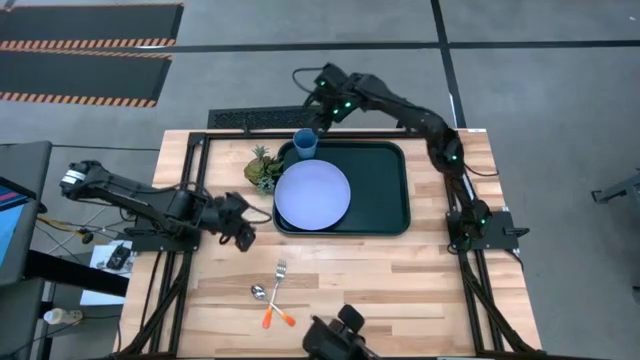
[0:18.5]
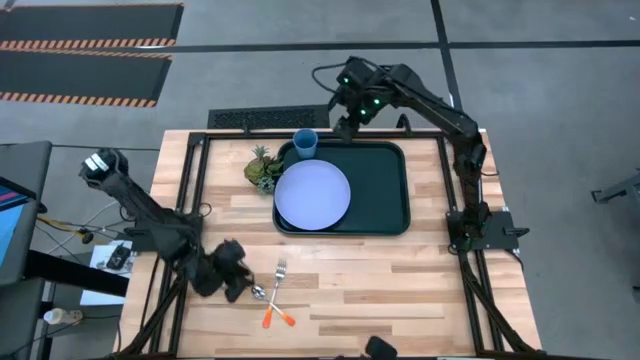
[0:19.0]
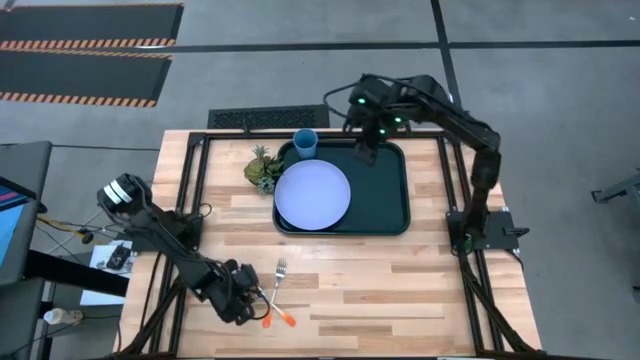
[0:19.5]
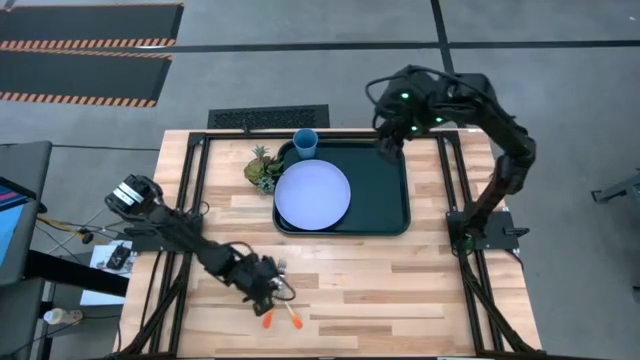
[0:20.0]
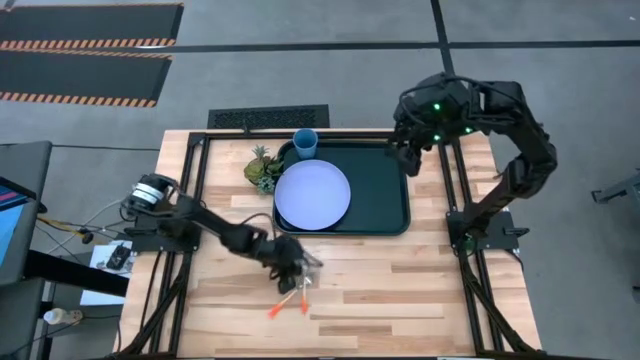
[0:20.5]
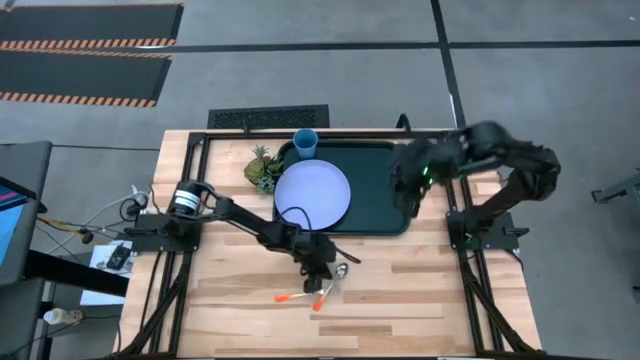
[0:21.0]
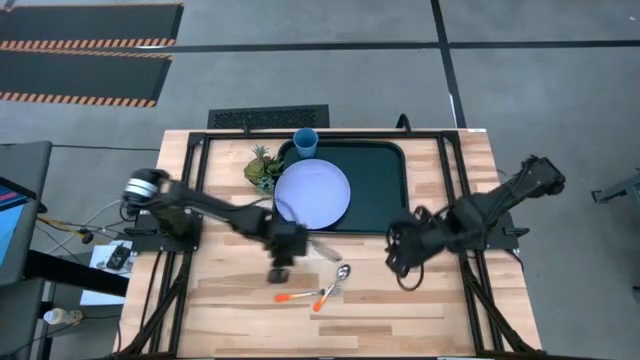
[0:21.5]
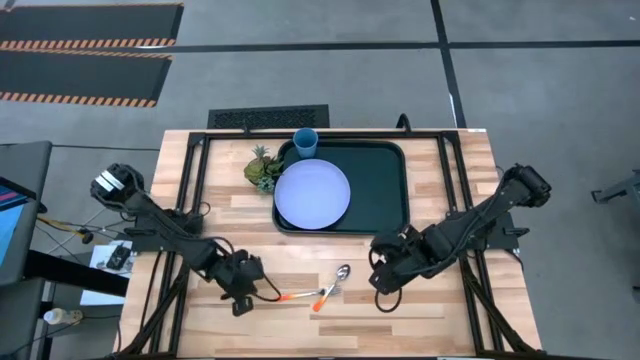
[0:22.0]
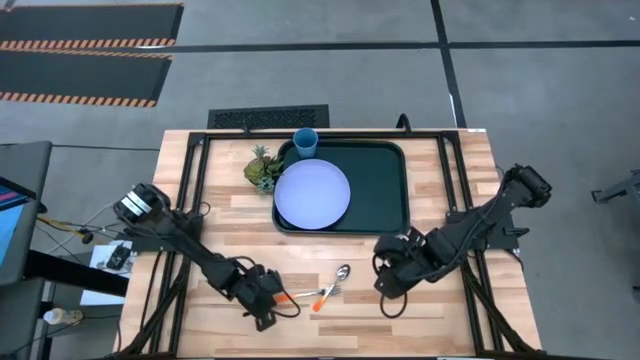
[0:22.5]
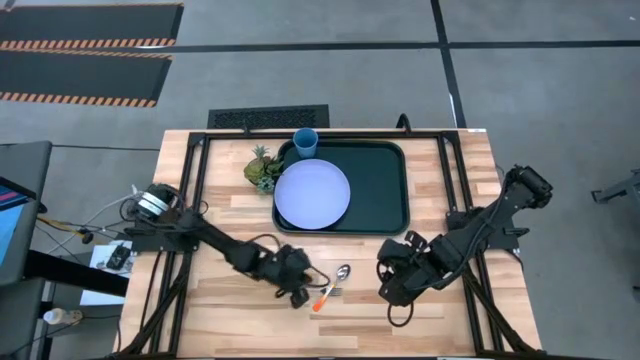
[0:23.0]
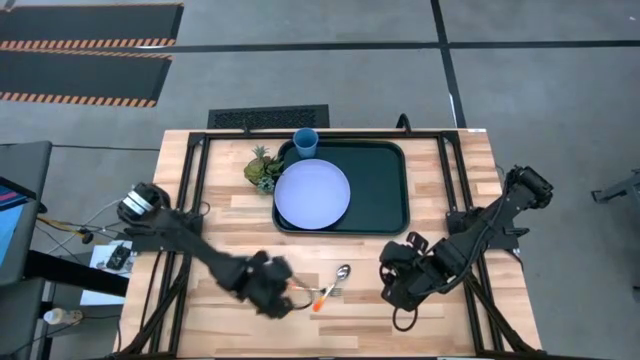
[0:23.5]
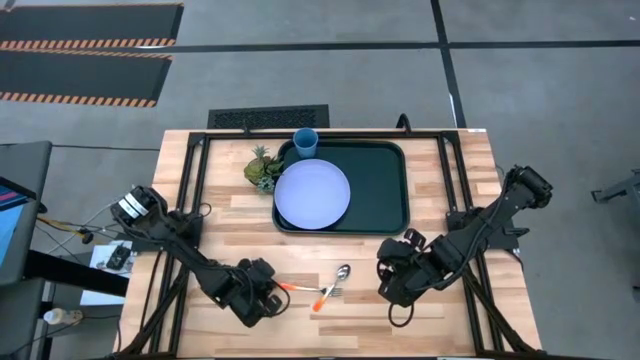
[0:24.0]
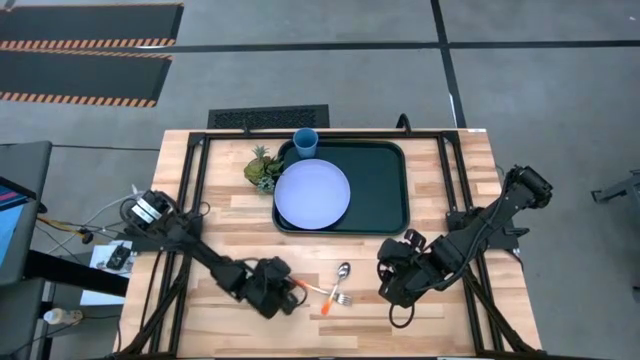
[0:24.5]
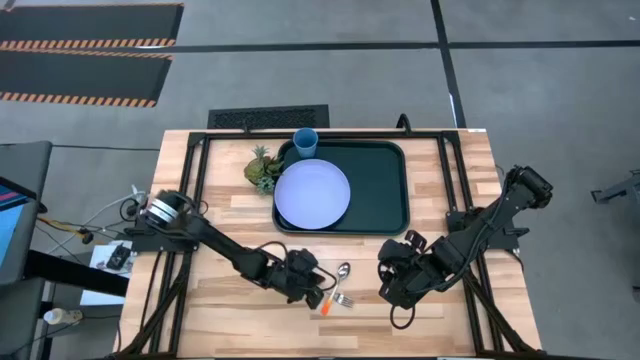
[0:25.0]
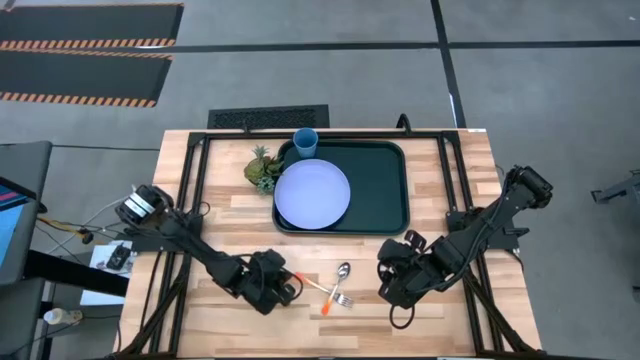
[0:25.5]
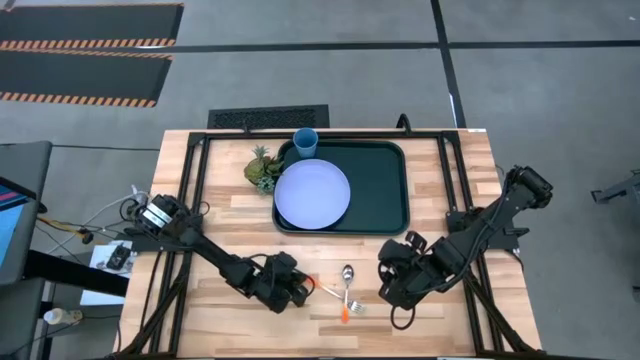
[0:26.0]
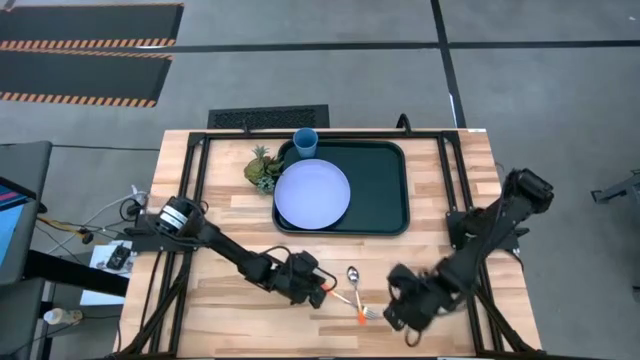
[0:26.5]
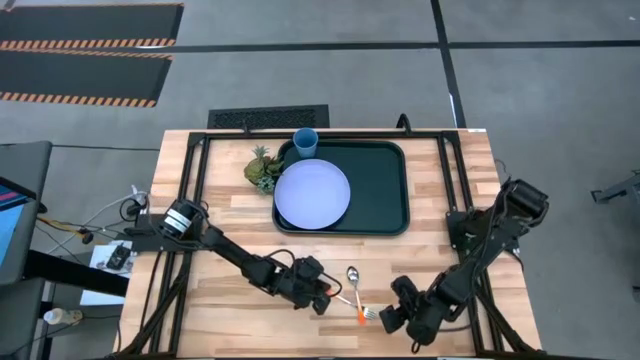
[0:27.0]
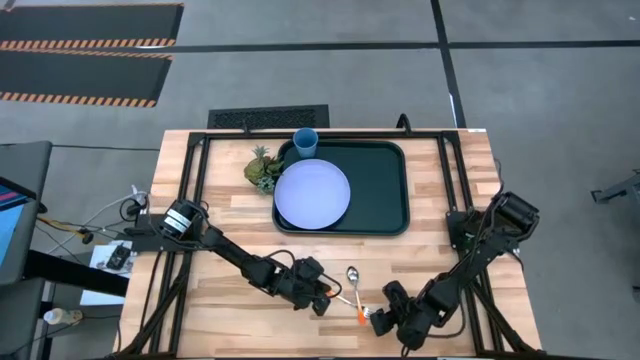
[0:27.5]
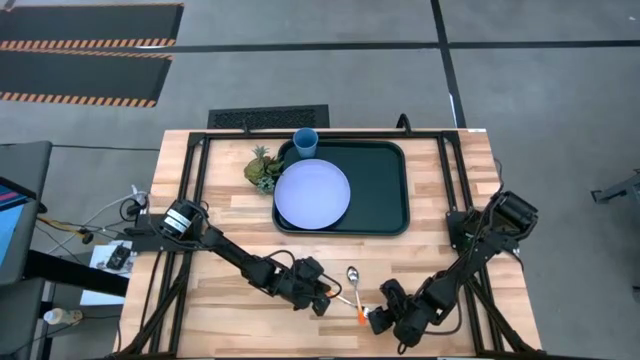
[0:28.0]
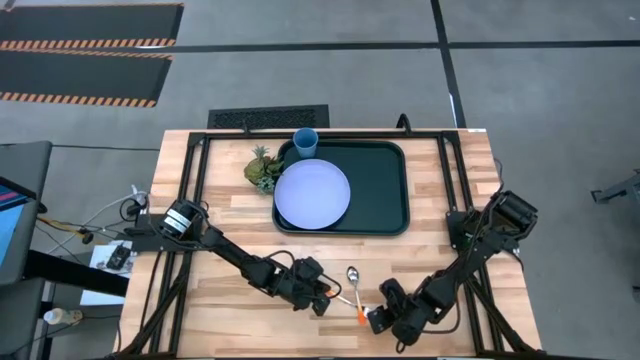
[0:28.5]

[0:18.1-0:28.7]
Task: Pick and place plate/cup/fork/spoon on tray
Adjust the orange fork and the orange spoon to the bottom center of the table

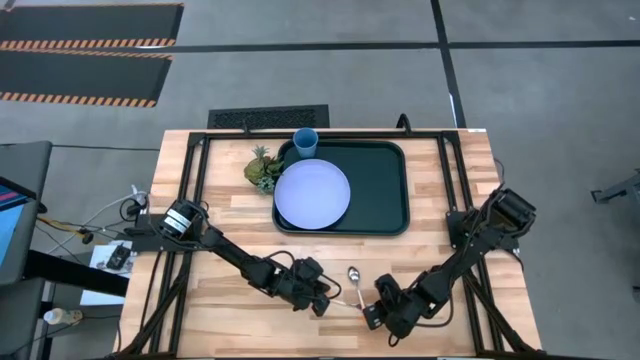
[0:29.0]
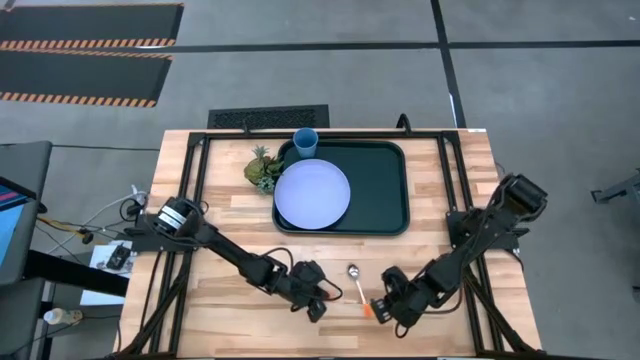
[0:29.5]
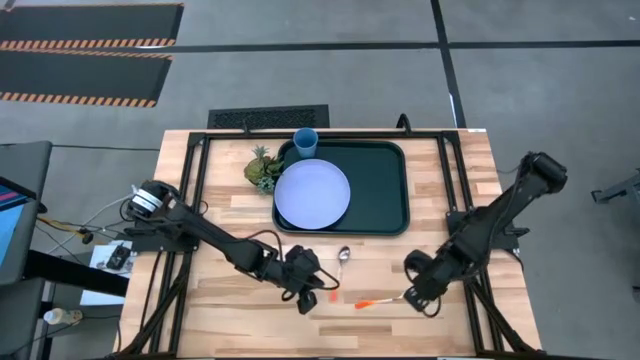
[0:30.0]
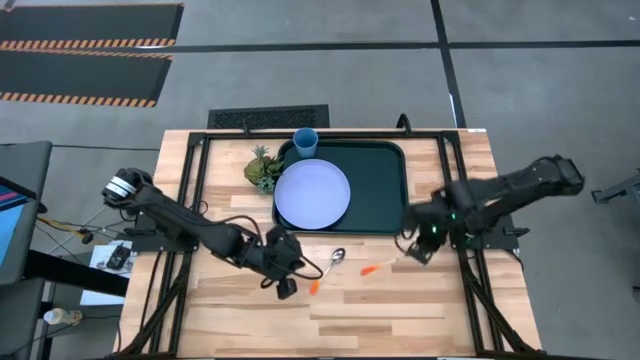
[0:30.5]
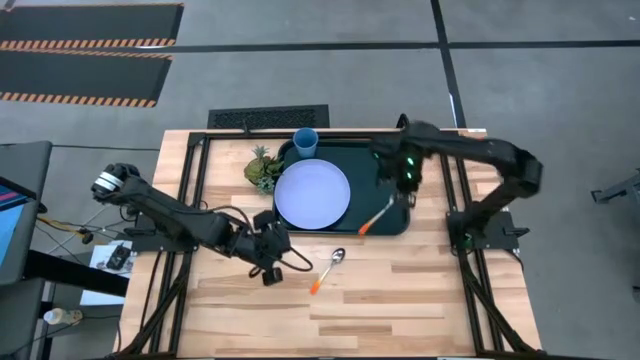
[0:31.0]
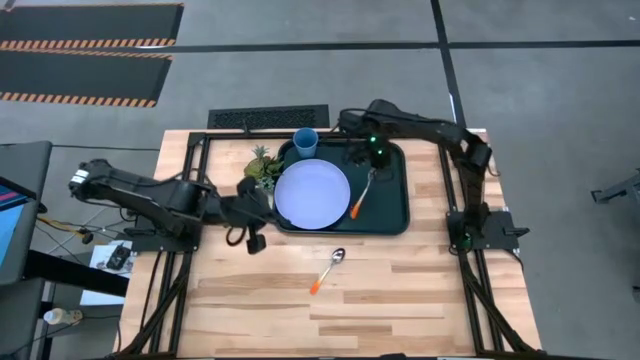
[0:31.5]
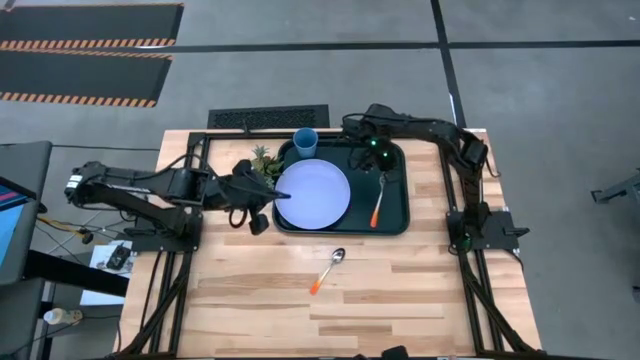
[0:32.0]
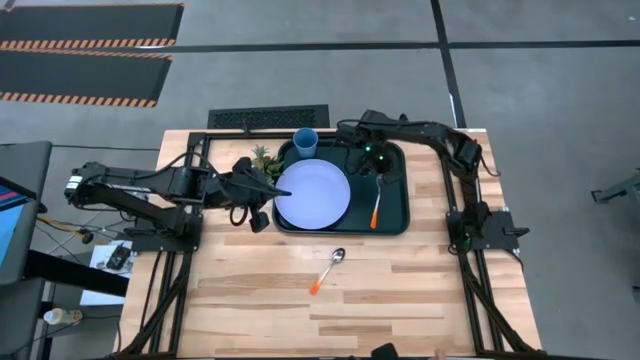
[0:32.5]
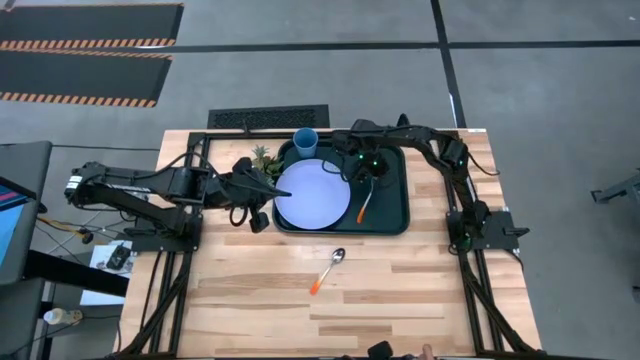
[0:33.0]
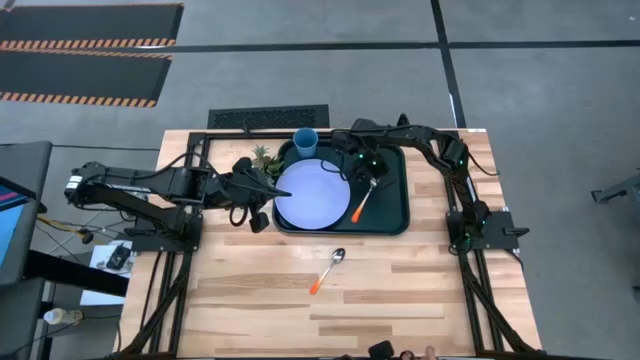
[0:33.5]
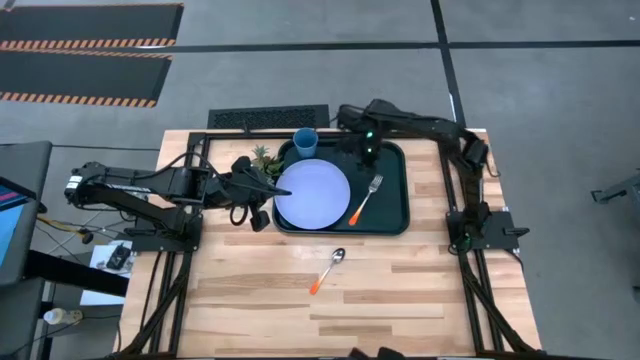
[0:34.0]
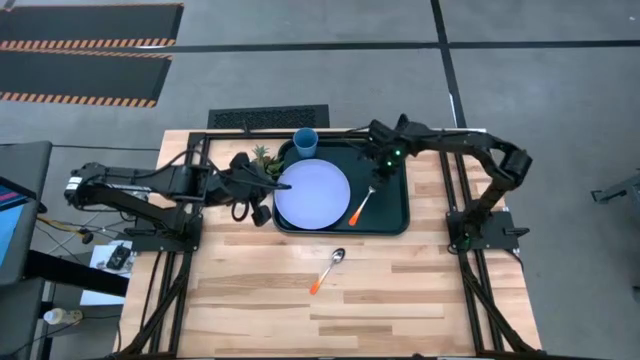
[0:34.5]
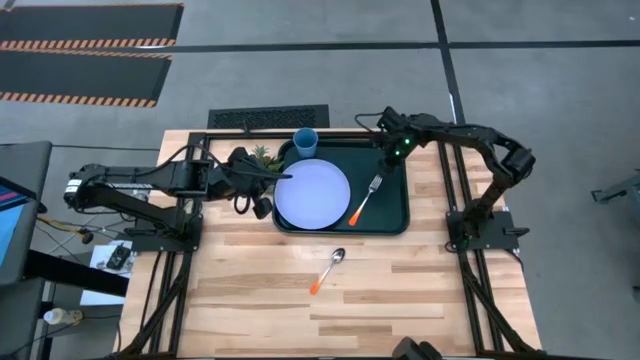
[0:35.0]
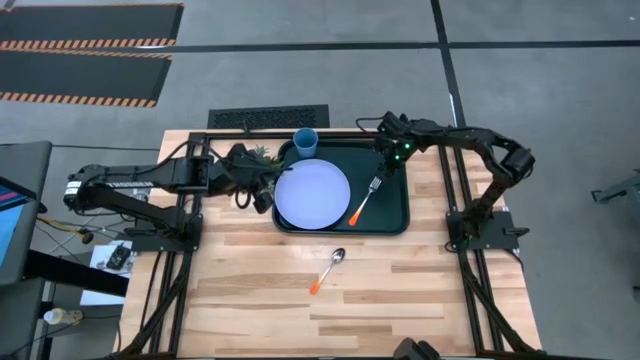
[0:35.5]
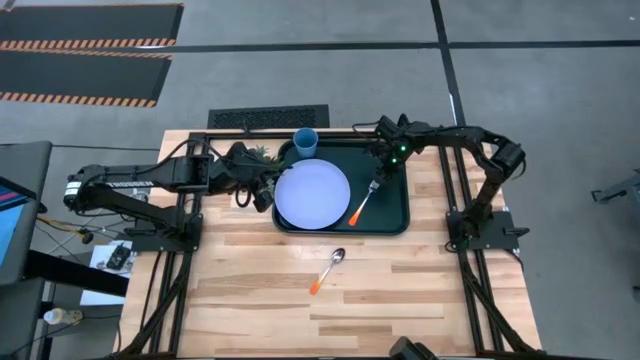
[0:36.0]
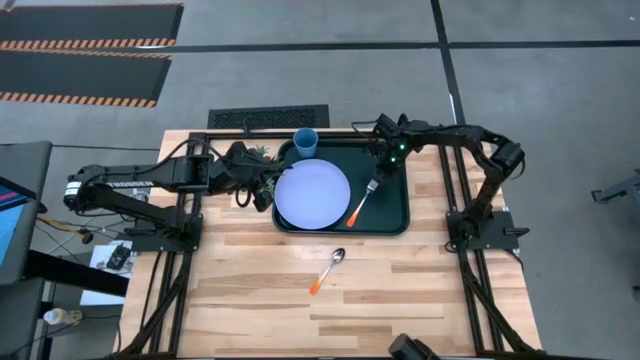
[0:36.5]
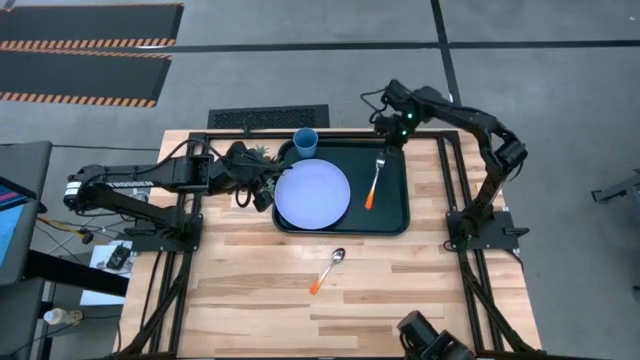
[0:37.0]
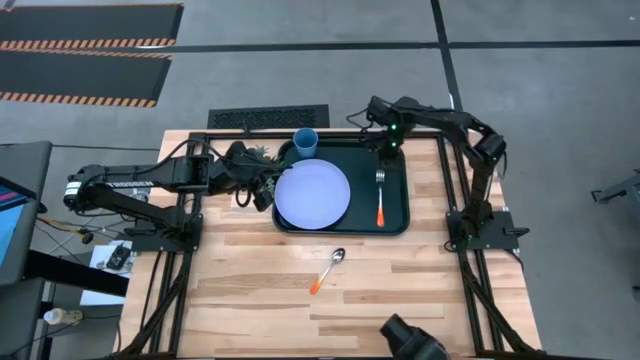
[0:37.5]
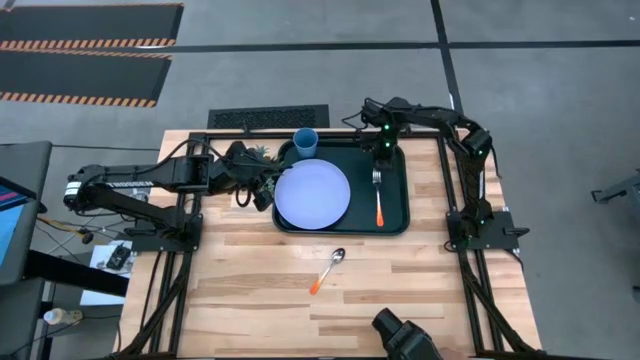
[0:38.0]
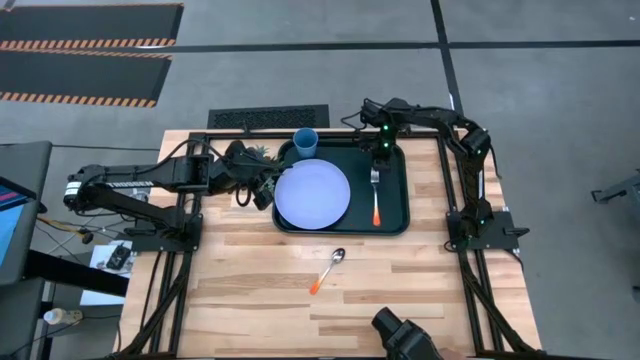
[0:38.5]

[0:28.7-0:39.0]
Put the orange fork on the black tray
